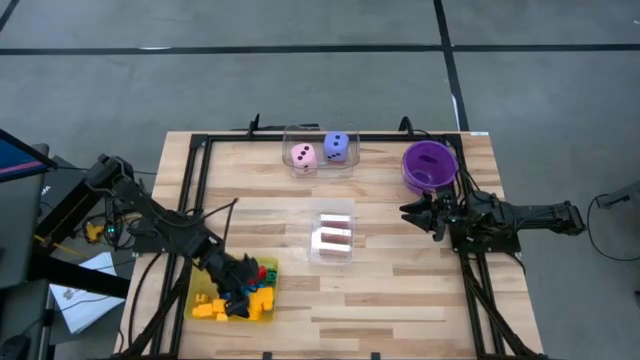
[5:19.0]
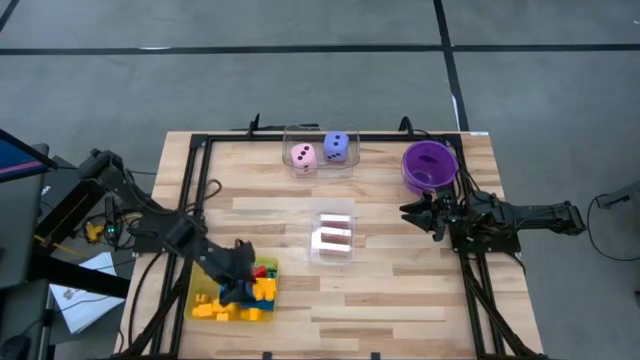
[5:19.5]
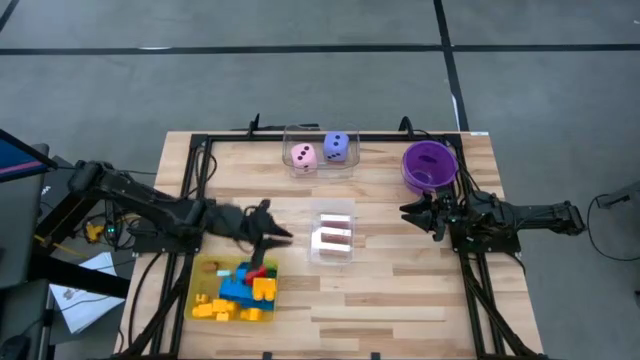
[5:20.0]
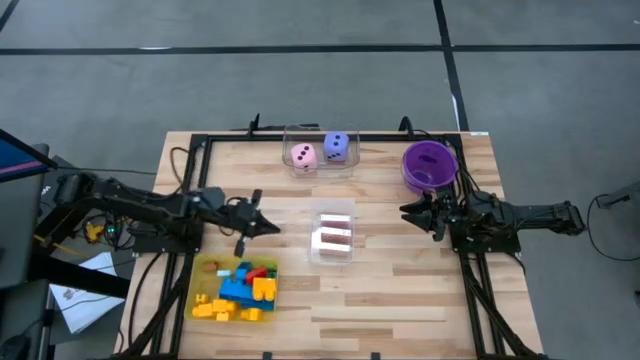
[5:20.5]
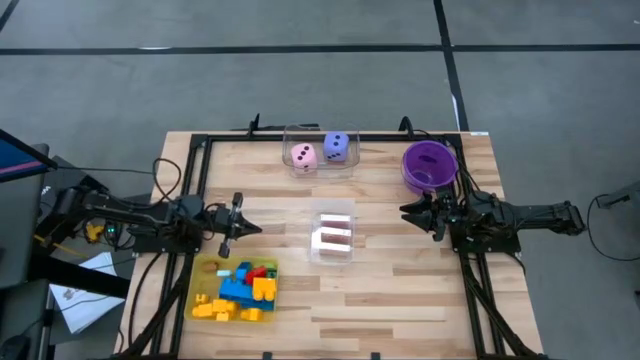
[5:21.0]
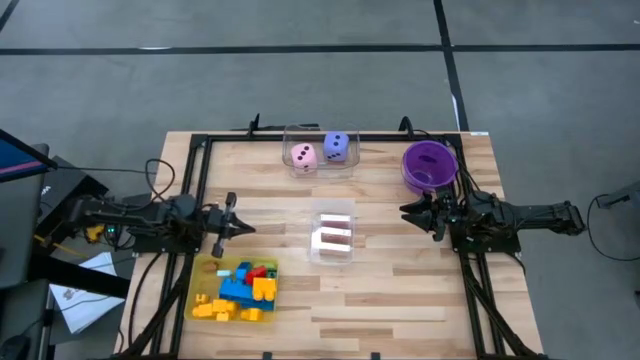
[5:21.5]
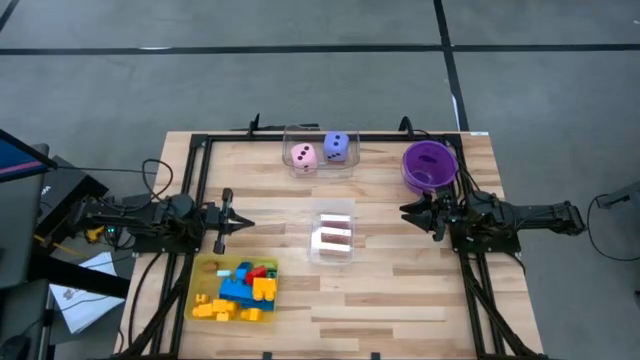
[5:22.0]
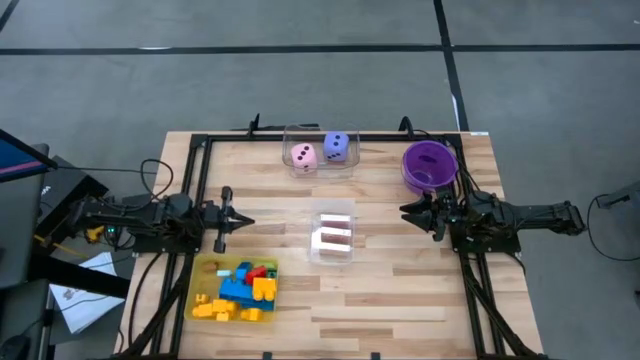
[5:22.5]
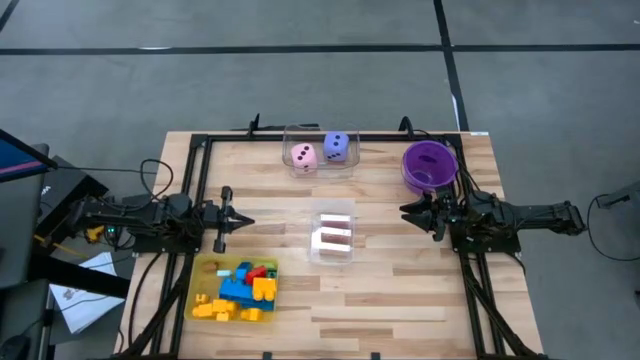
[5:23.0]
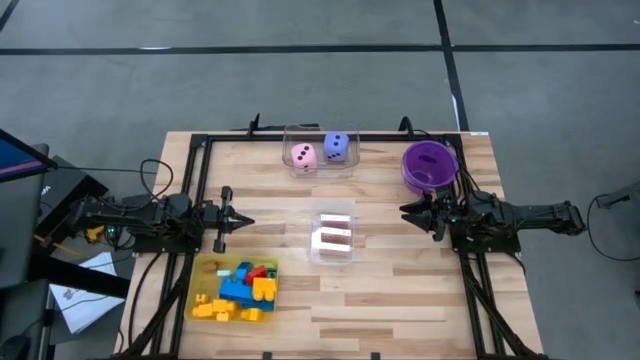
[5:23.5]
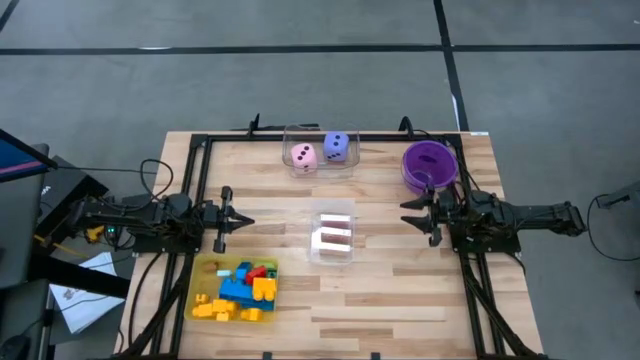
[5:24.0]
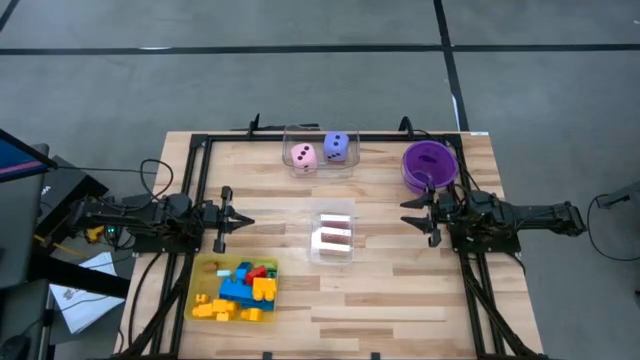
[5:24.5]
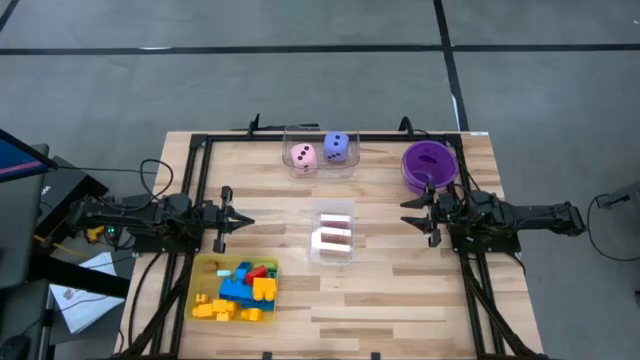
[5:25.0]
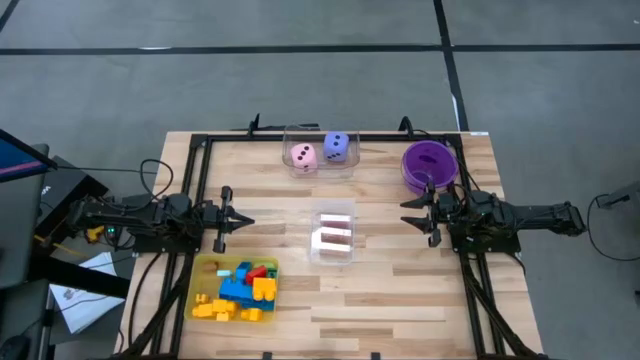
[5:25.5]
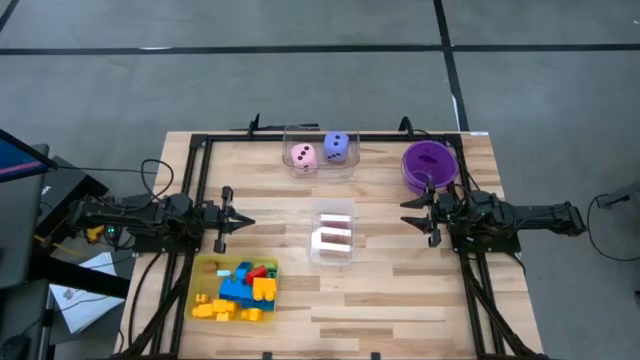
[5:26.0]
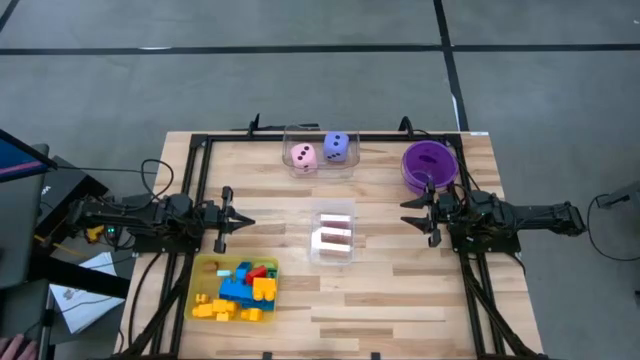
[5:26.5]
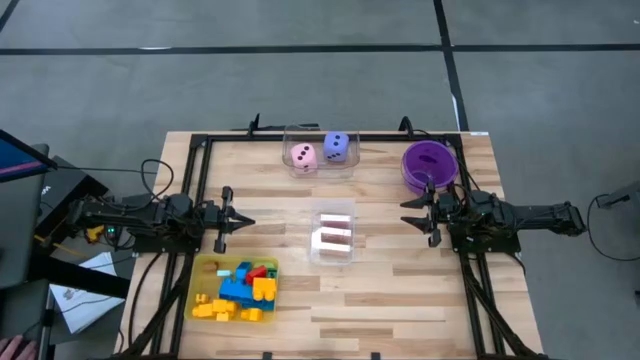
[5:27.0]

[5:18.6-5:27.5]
Task: Pick & Place Toys
Return to Home Position

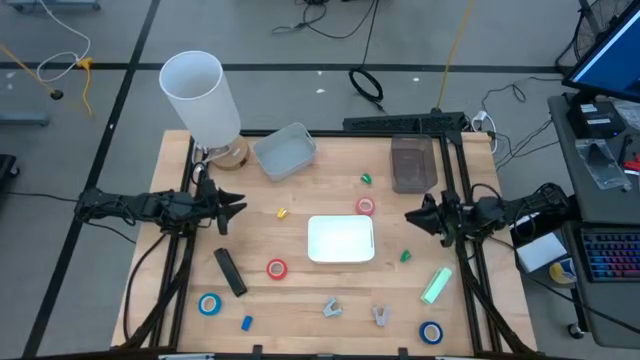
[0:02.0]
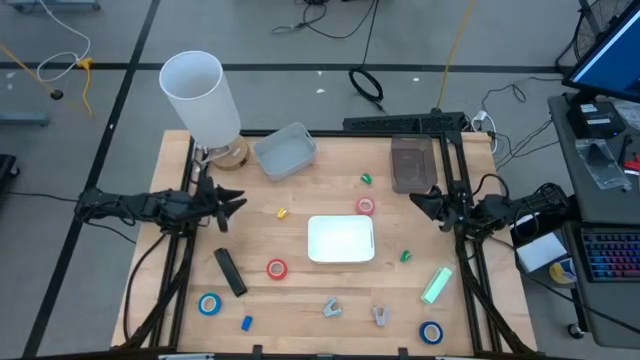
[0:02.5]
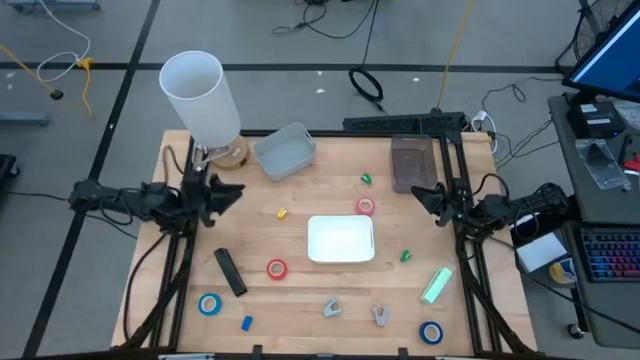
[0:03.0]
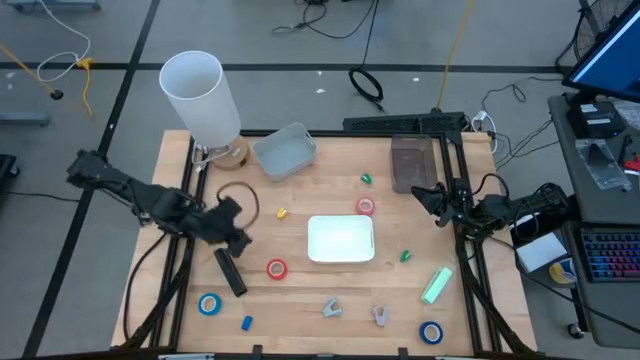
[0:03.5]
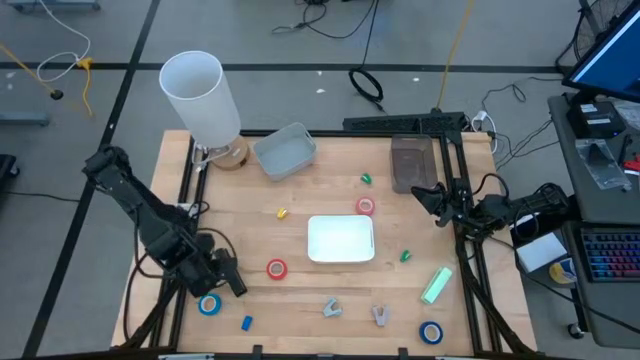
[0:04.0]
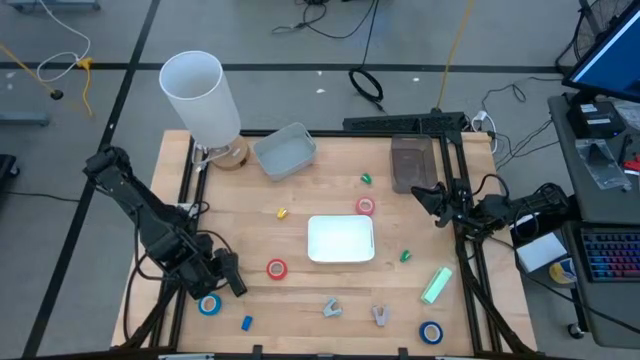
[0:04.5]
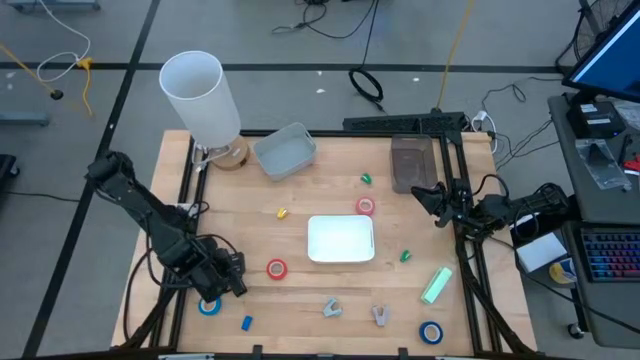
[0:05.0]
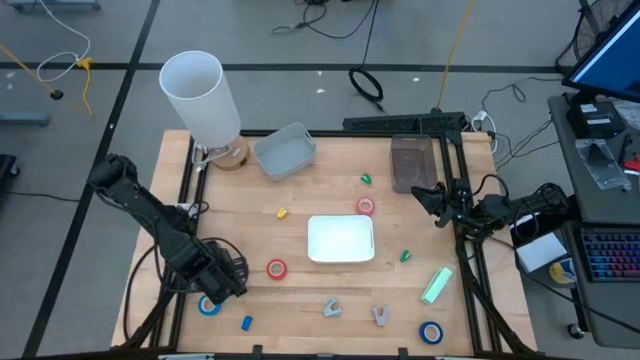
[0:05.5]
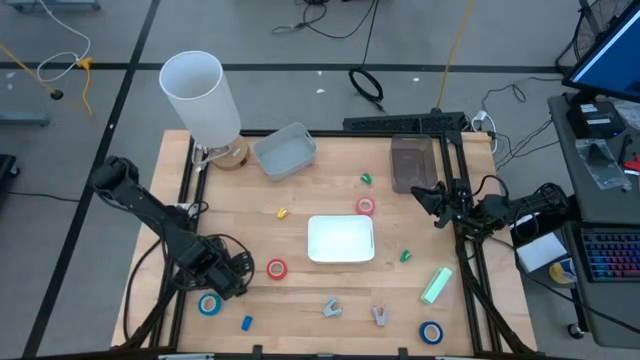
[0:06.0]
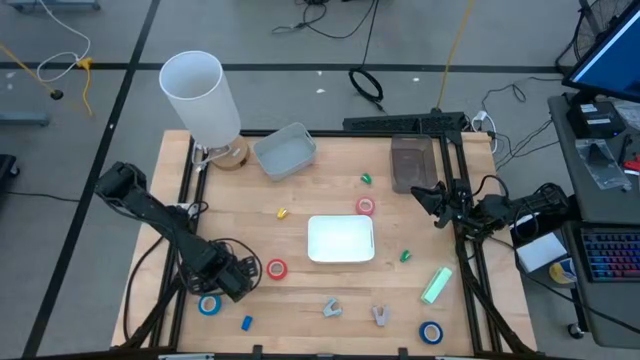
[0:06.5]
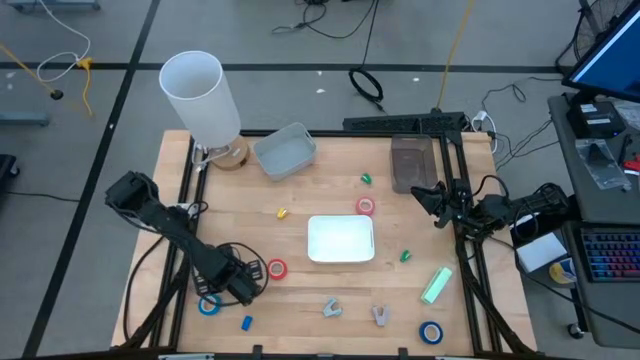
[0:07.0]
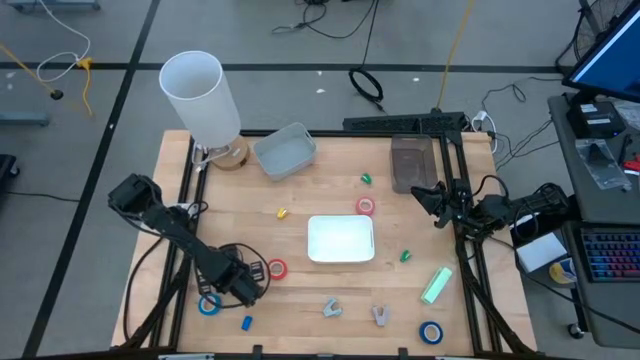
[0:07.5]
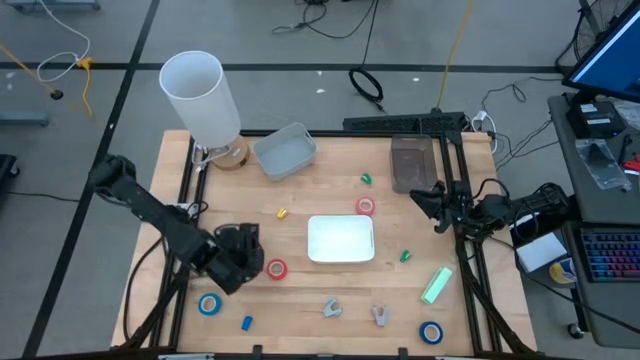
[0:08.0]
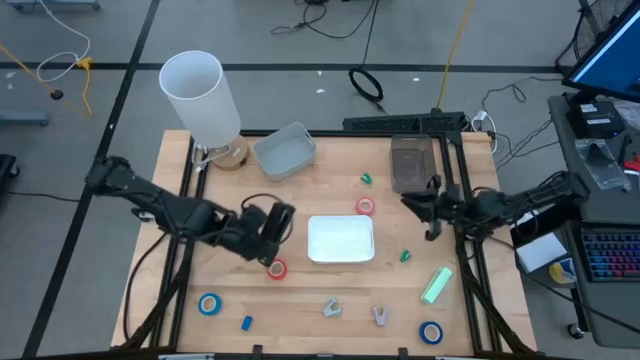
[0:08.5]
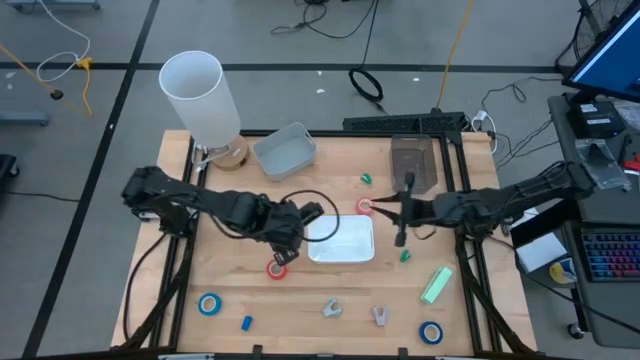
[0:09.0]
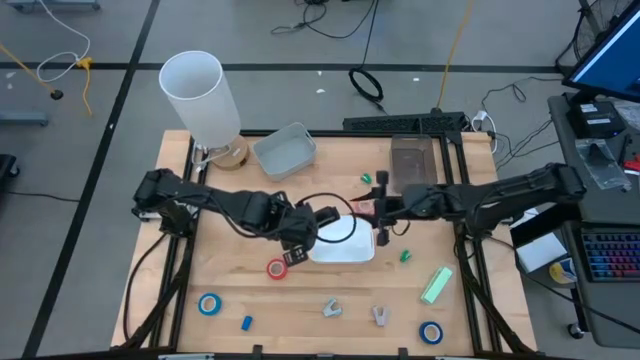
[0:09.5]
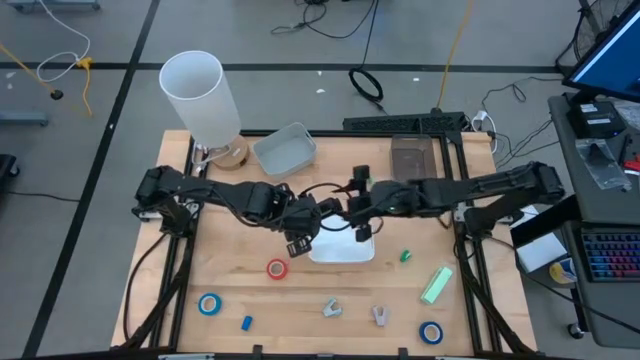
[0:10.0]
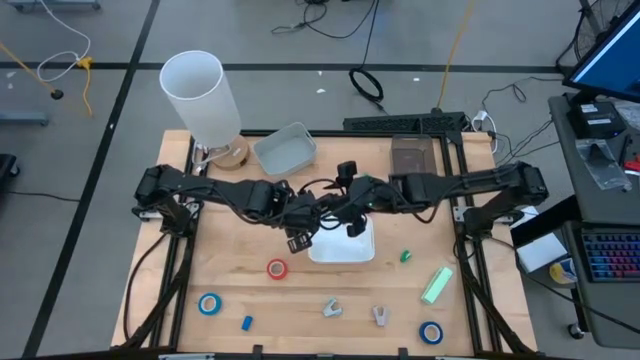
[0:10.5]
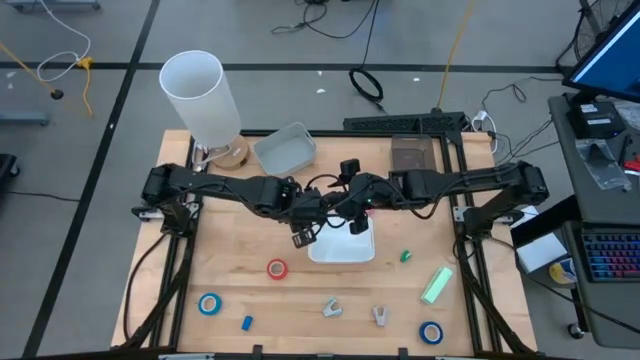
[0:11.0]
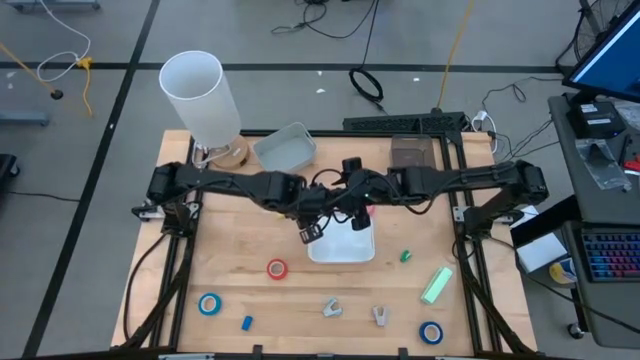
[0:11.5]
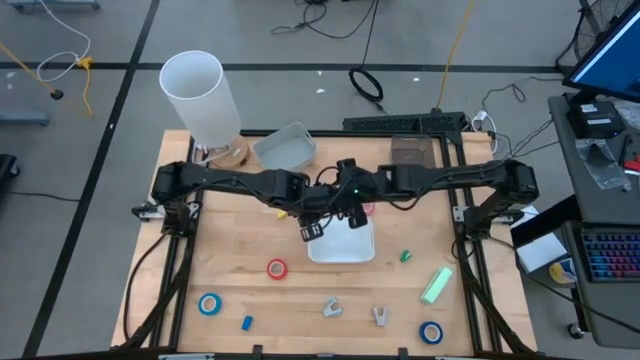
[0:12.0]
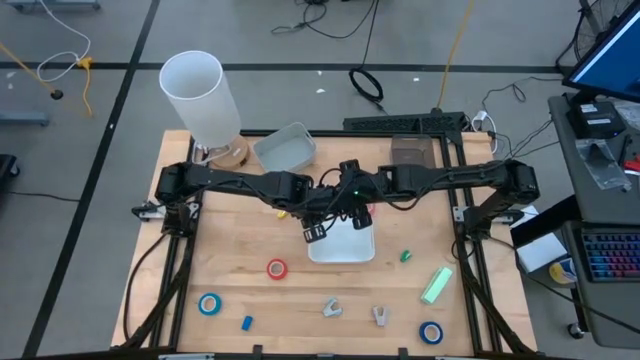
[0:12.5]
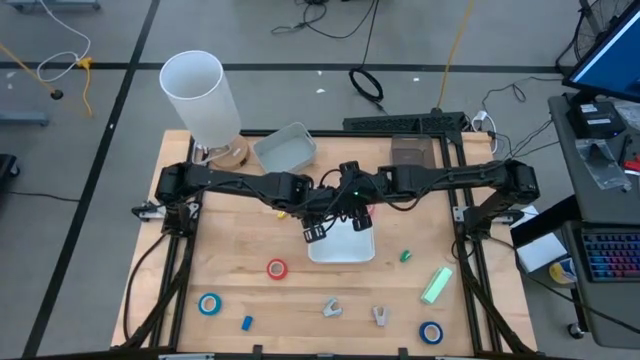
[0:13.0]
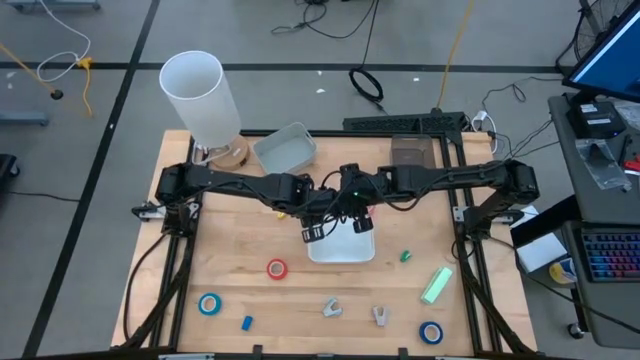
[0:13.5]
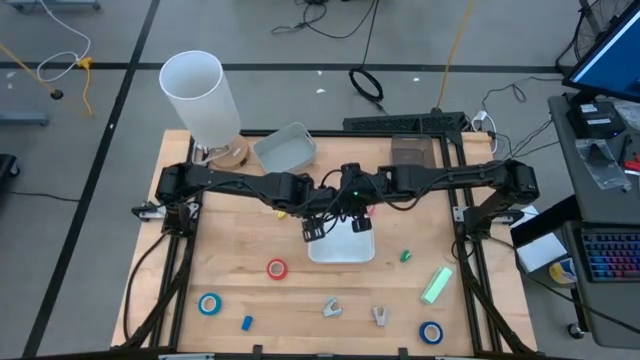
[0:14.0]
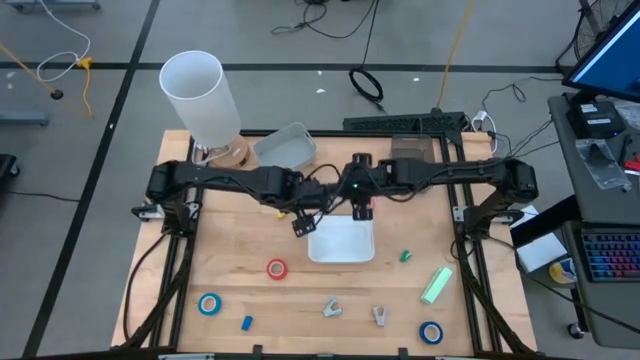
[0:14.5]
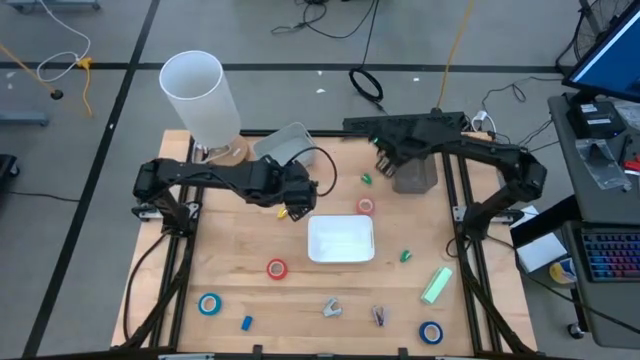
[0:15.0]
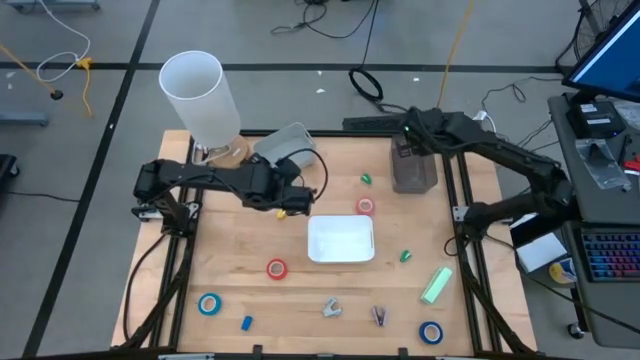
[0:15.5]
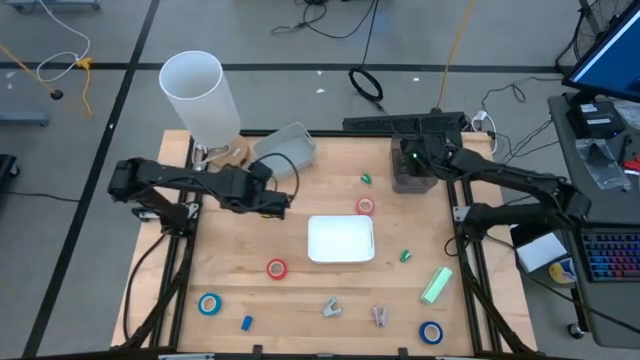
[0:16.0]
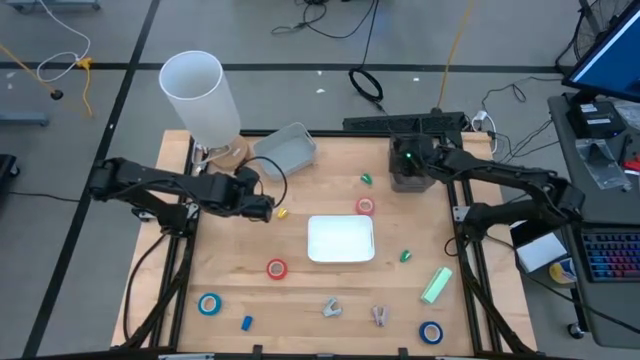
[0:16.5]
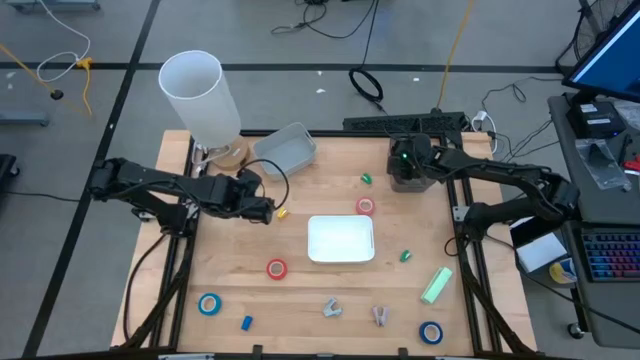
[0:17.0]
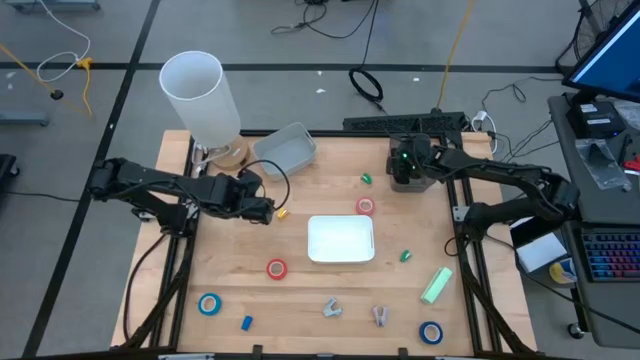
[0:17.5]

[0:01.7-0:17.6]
Task: Pick and place Stapler, Stapler remover, tape
Put the black stapler into the black bin
